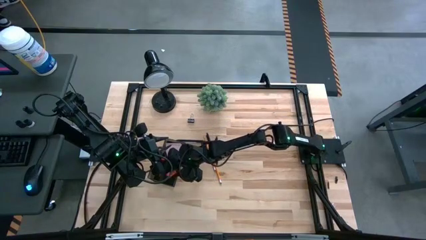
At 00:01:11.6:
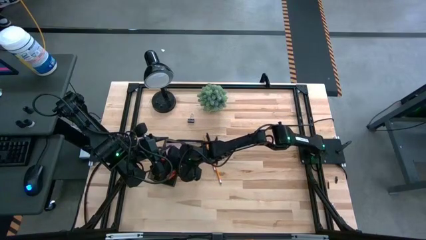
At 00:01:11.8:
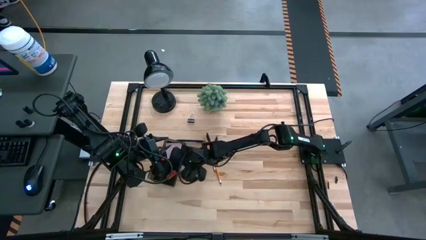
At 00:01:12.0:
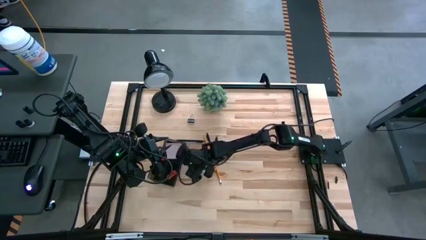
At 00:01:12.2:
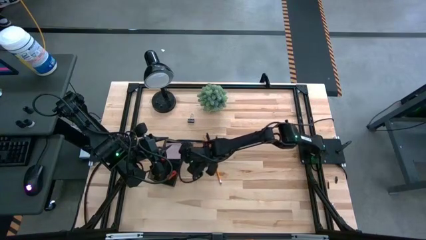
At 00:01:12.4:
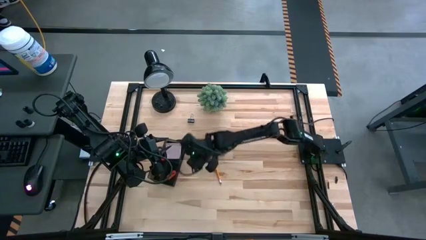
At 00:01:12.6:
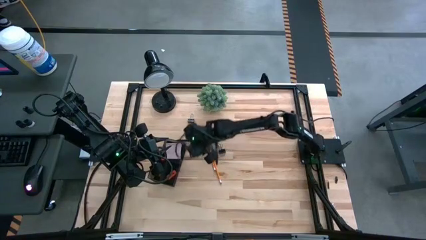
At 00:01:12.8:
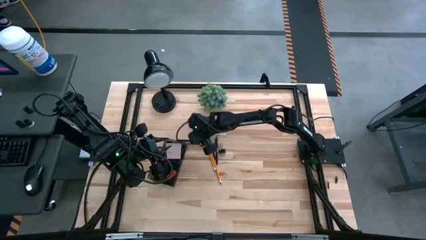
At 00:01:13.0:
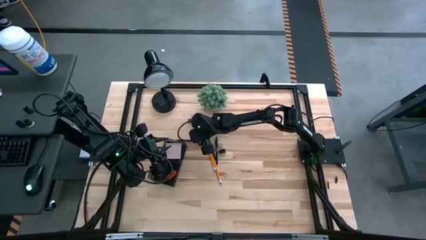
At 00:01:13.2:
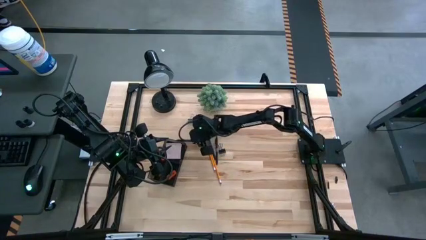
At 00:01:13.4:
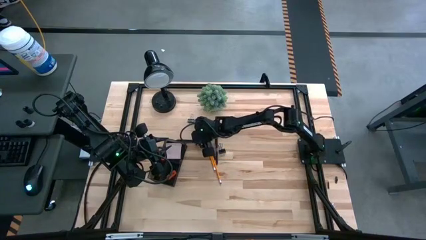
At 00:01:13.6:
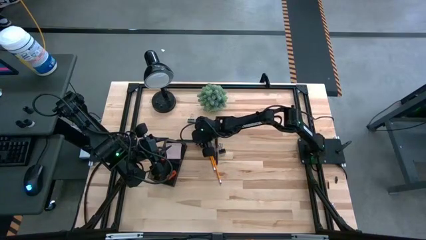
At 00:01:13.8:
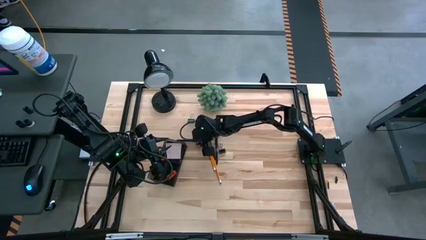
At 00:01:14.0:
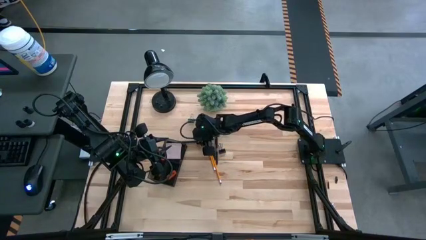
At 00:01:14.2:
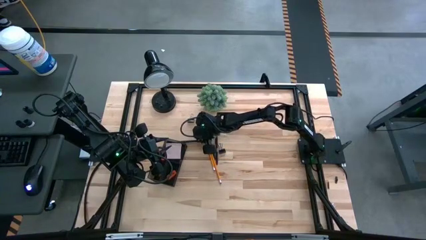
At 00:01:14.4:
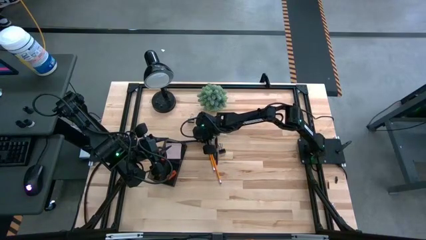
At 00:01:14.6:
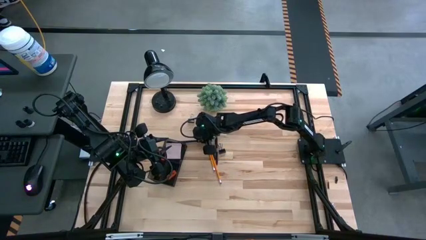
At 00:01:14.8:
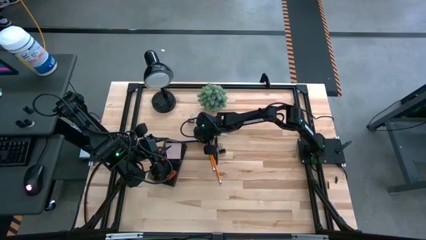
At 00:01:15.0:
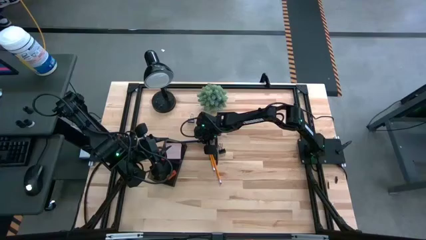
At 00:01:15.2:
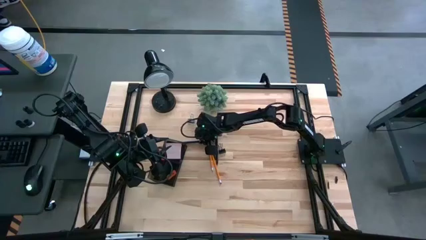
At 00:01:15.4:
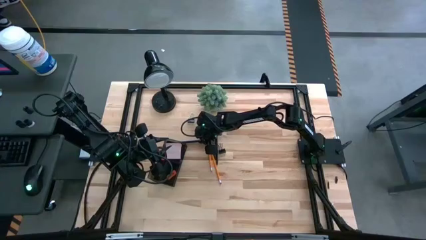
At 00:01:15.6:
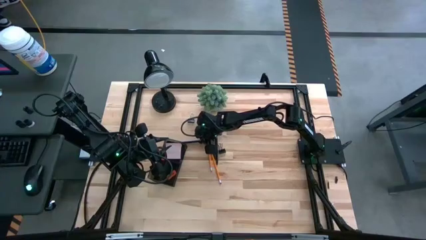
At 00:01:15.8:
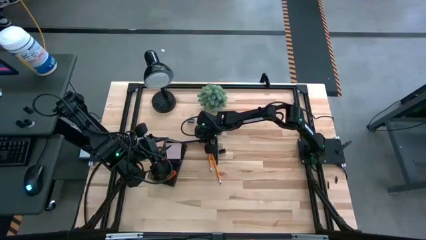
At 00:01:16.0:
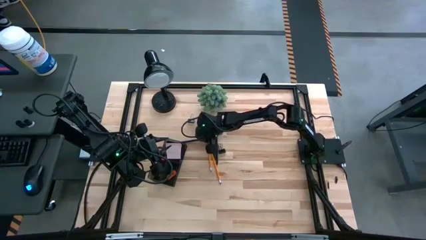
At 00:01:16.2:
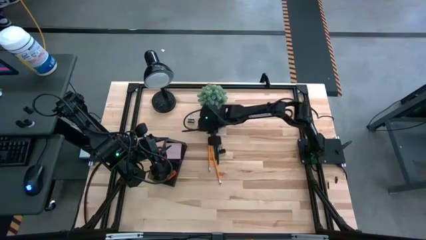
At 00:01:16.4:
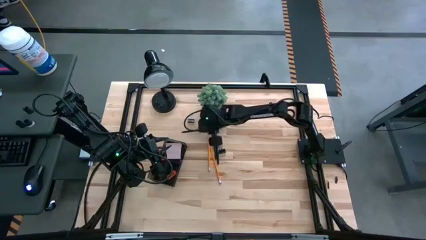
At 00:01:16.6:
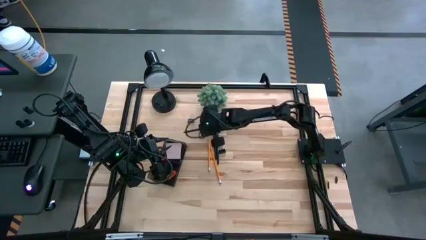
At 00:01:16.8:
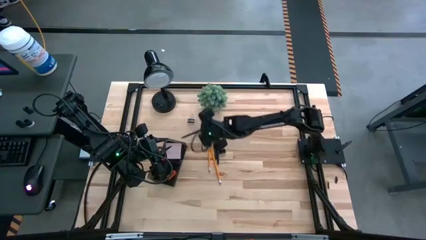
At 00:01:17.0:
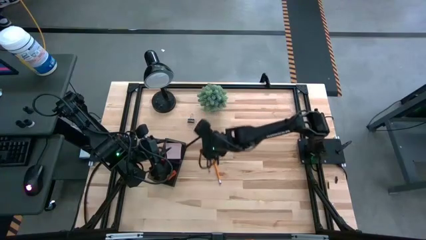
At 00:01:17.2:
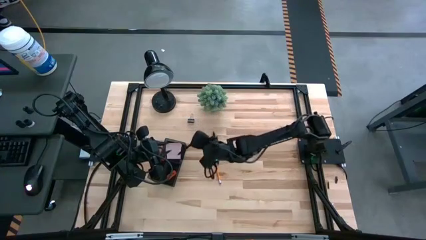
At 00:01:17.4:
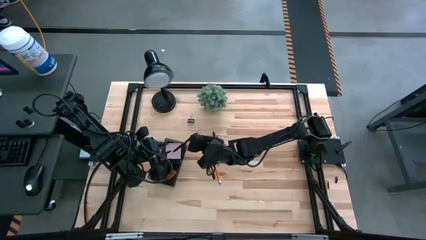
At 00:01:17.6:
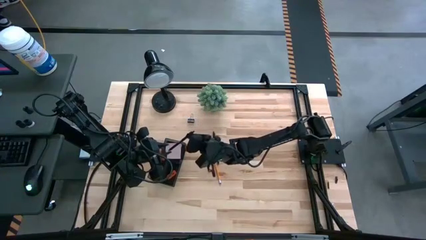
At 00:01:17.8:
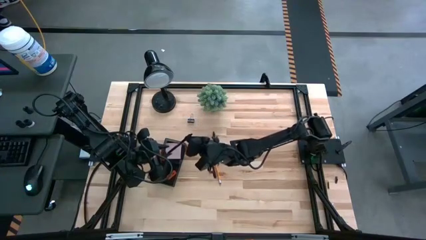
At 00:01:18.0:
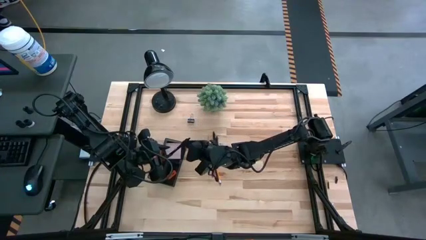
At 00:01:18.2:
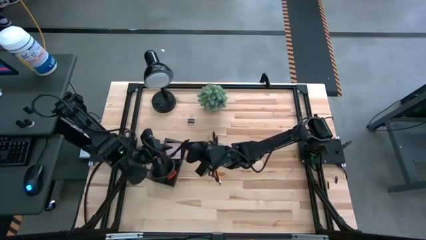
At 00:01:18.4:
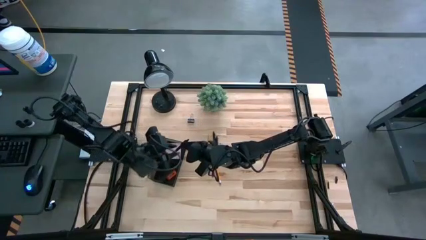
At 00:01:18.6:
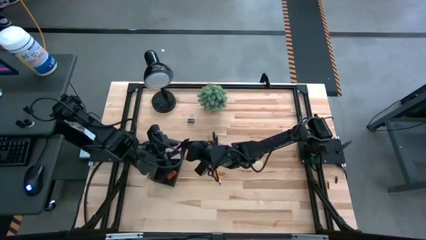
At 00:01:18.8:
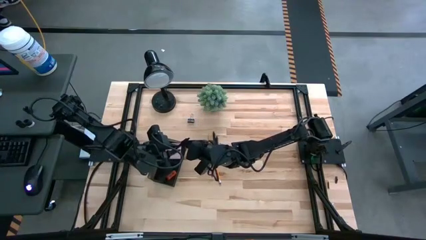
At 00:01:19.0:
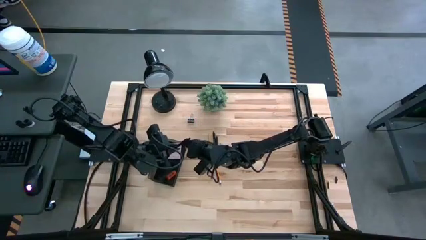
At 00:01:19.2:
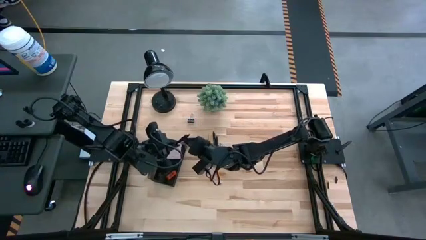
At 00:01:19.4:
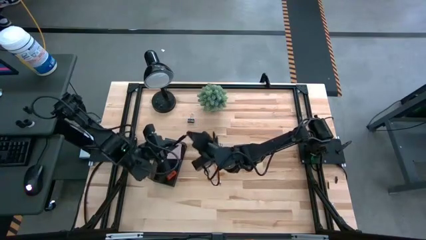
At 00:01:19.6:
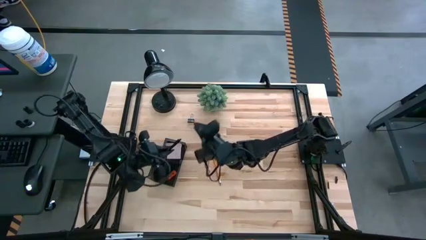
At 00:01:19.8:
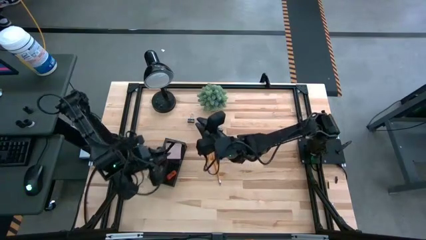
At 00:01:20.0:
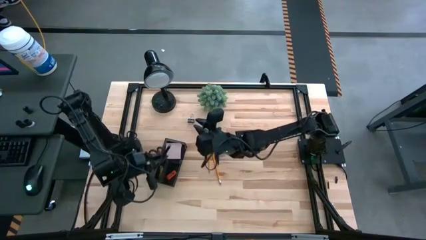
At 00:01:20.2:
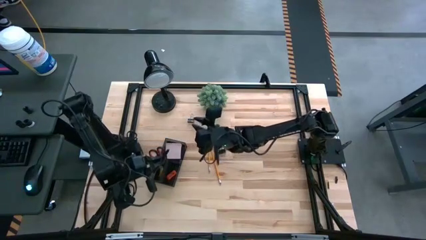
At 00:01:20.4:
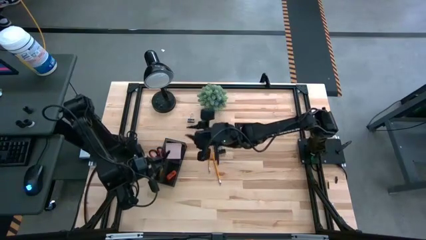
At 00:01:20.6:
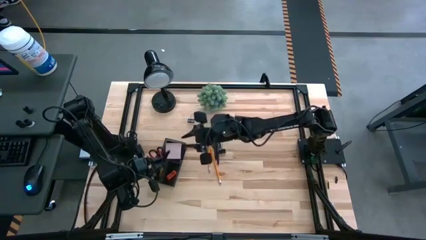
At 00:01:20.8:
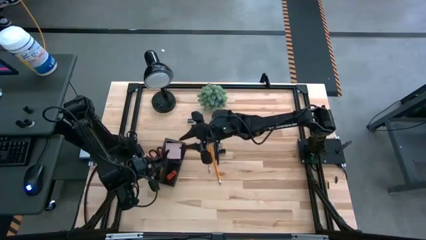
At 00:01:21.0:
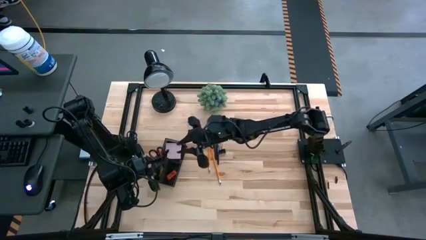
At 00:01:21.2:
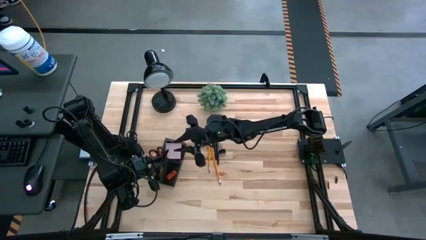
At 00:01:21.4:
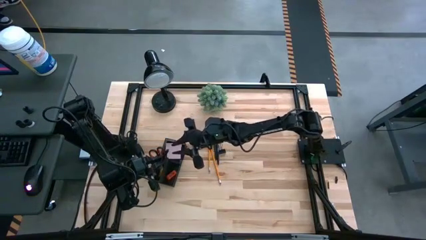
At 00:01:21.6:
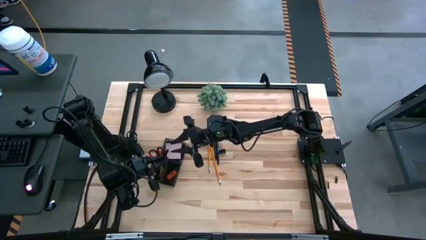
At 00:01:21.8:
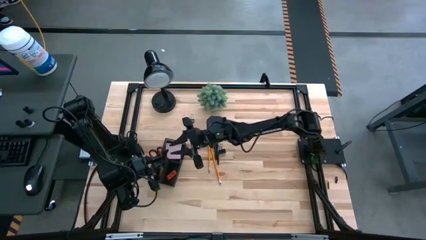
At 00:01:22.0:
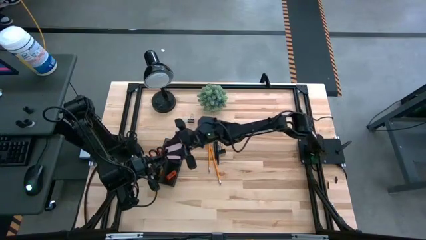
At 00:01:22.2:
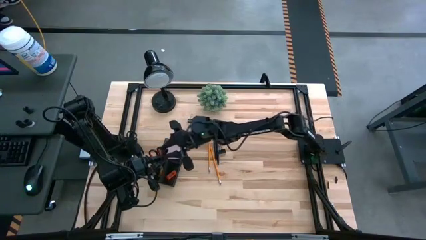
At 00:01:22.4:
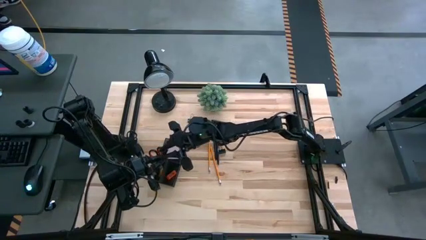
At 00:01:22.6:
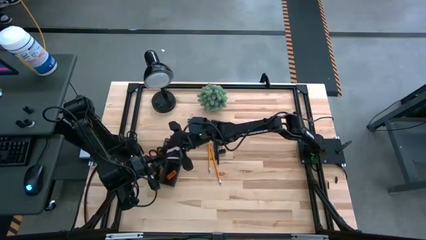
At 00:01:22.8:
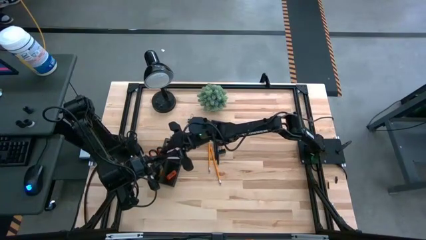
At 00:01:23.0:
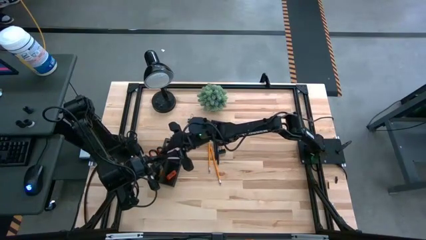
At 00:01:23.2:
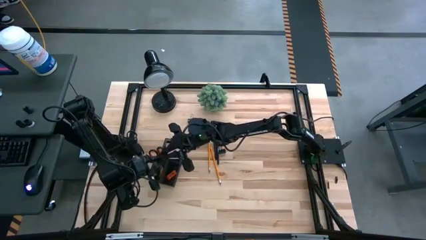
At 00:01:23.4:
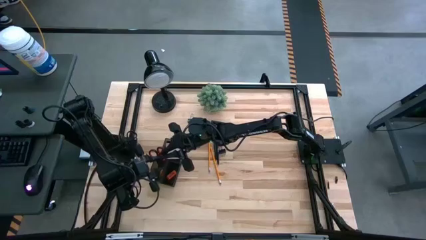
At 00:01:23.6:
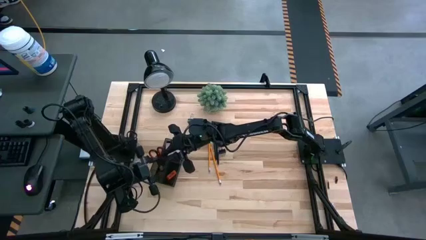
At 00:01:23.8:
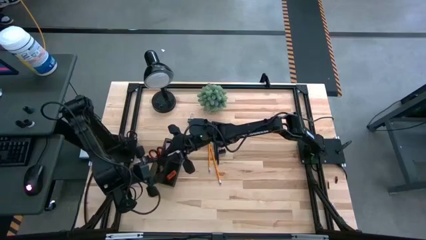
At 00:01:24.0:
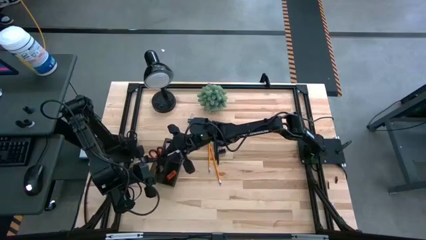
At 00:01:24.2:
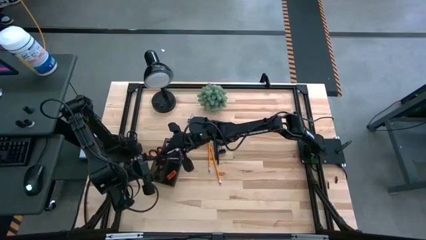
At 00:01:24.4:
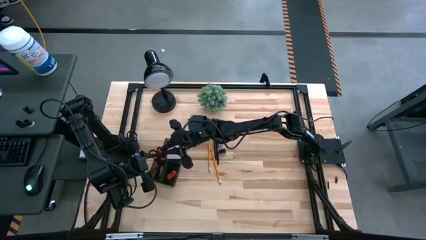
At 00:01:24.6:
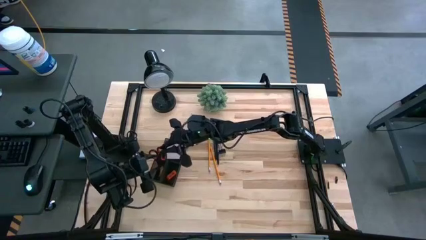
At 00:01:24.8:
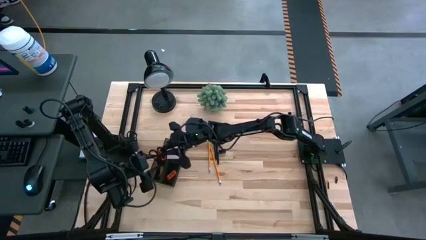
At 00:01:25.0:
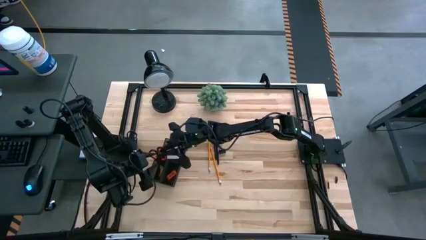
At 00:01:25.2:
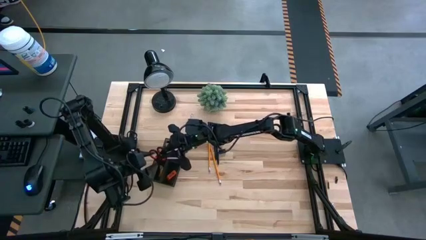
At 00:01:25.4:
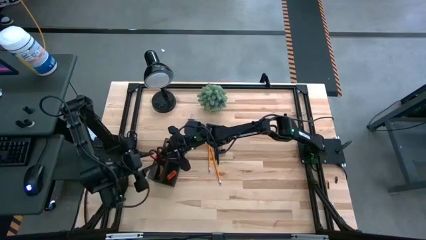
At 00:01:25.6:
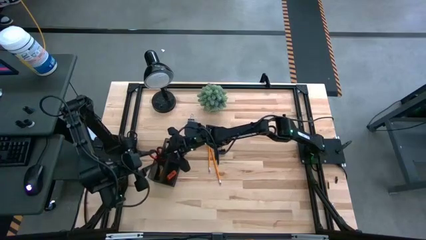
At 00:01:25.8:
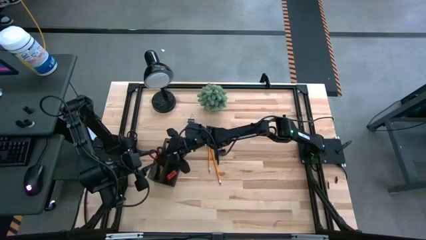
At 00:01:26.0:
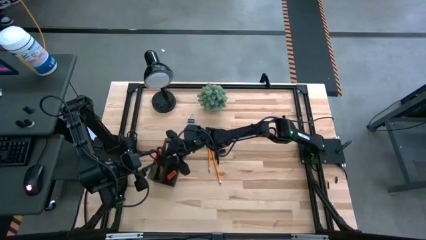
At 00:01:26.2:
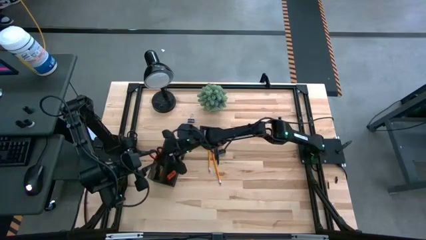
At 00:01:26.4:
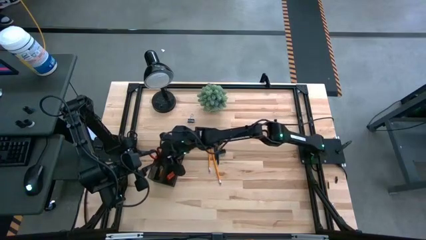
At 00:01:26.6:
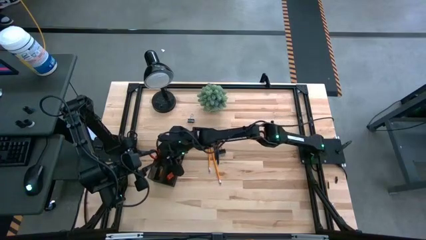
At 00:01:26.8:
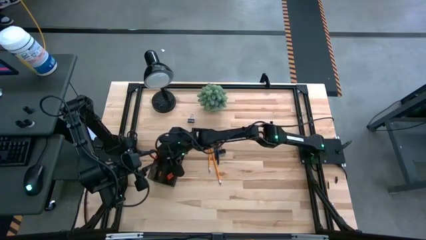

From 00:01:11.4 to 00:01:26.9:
Task: Pick and place office supplies into organizer
Put the left black pen into the desk organizer
